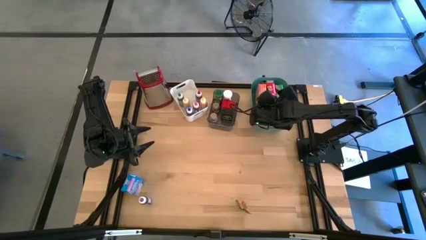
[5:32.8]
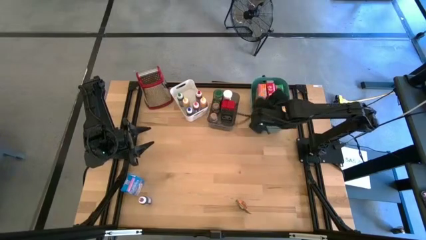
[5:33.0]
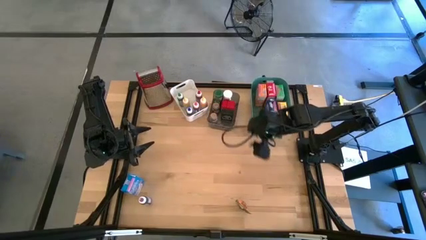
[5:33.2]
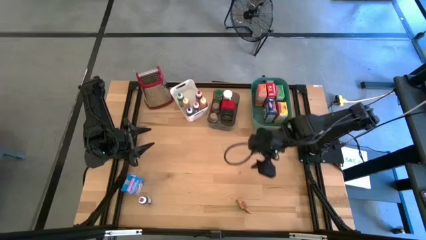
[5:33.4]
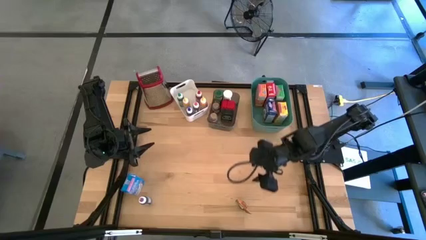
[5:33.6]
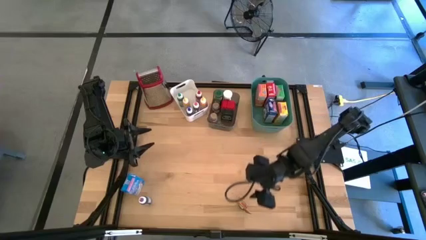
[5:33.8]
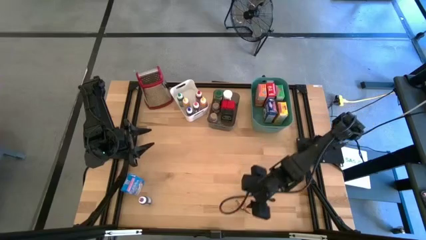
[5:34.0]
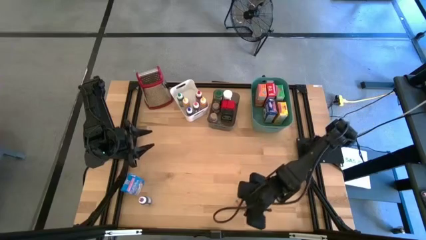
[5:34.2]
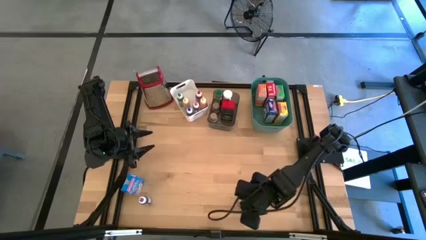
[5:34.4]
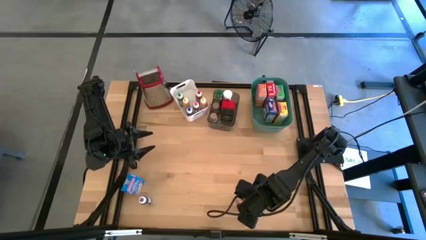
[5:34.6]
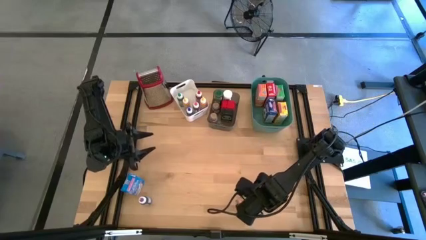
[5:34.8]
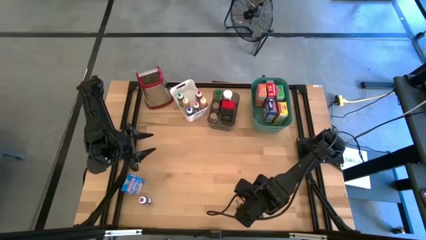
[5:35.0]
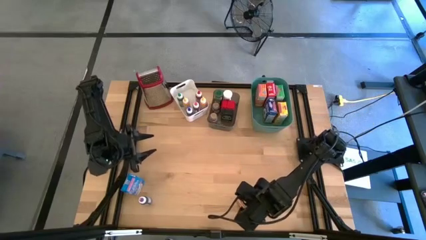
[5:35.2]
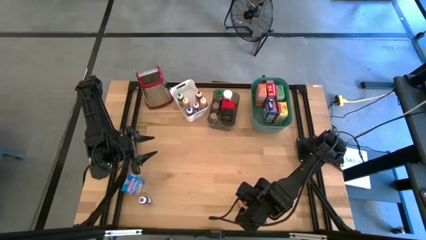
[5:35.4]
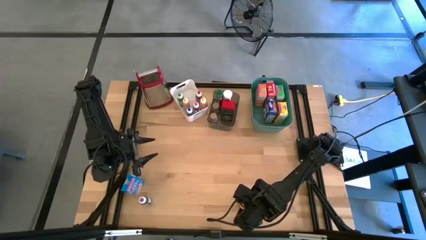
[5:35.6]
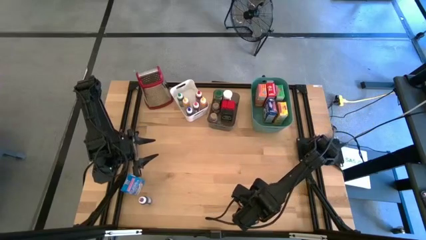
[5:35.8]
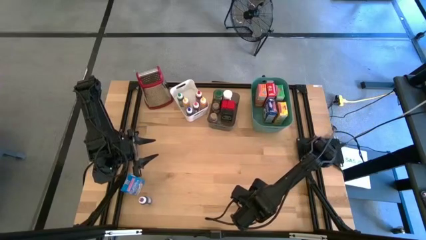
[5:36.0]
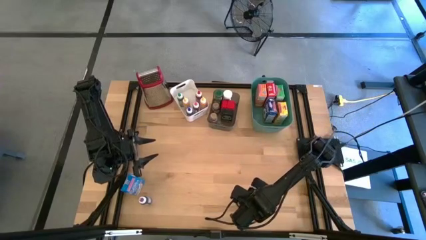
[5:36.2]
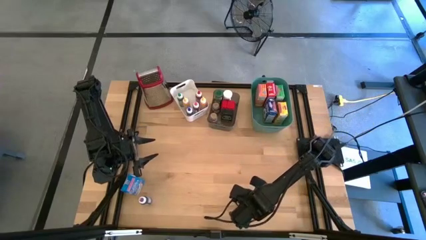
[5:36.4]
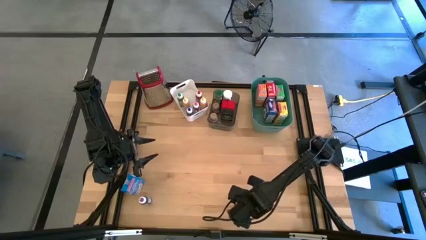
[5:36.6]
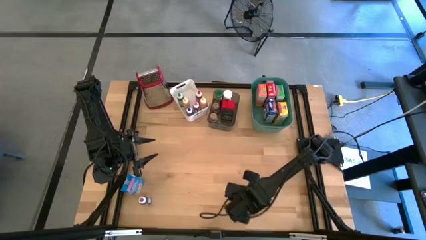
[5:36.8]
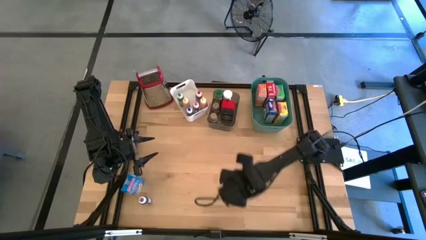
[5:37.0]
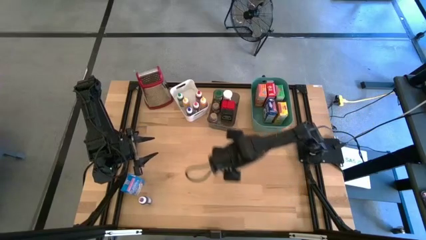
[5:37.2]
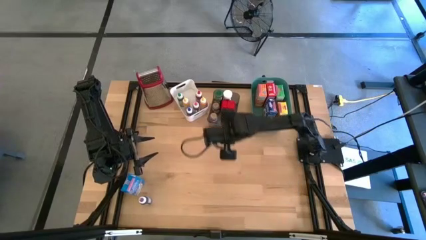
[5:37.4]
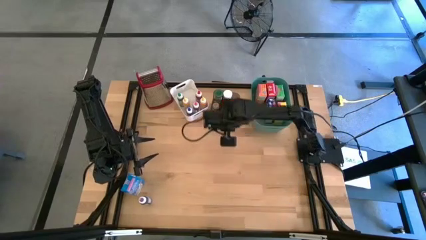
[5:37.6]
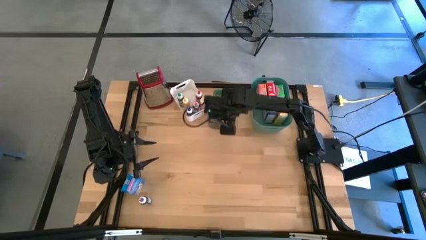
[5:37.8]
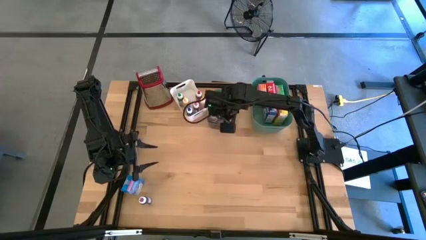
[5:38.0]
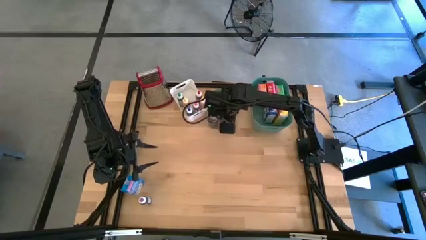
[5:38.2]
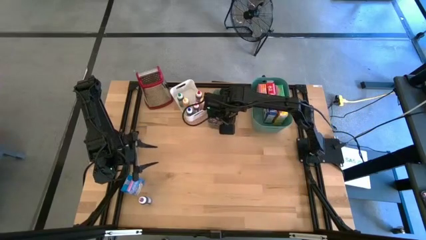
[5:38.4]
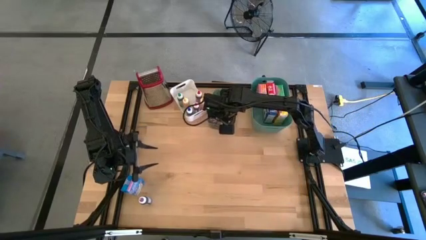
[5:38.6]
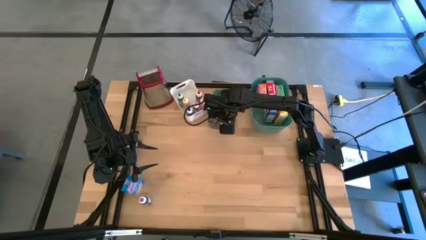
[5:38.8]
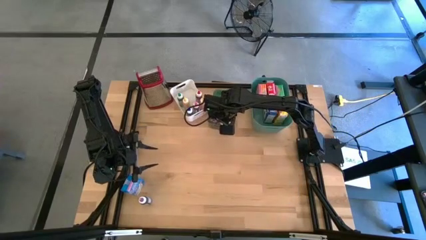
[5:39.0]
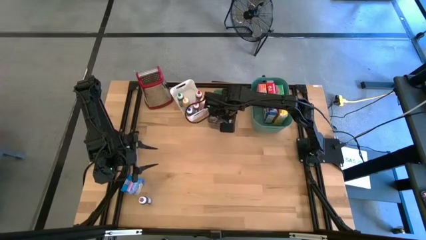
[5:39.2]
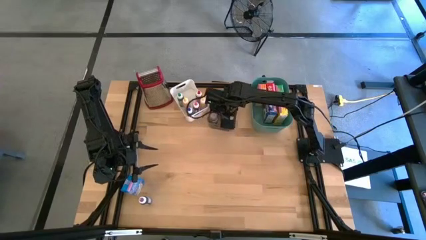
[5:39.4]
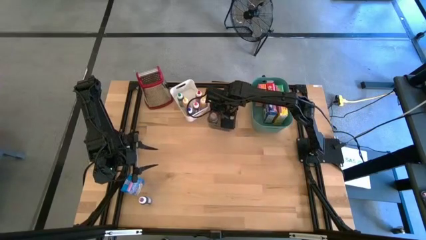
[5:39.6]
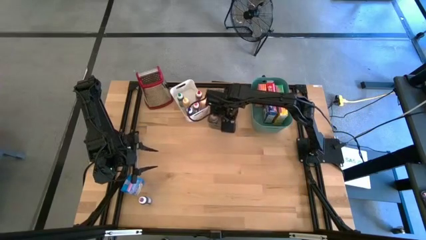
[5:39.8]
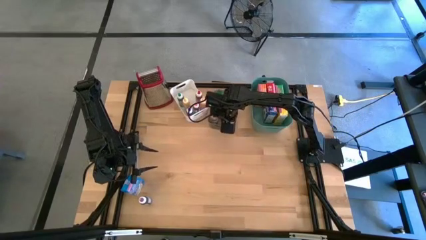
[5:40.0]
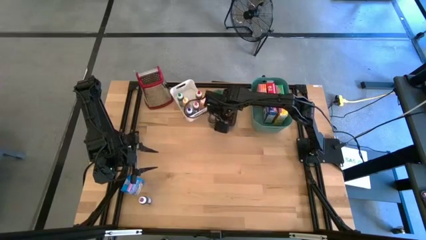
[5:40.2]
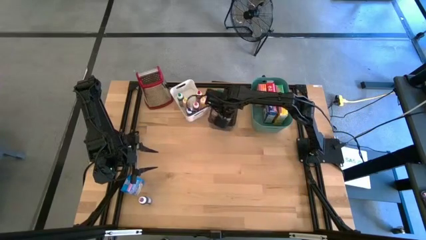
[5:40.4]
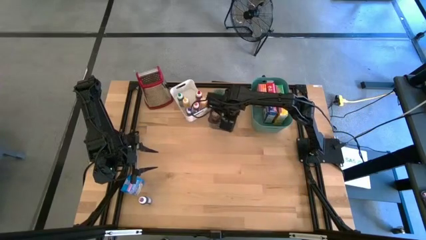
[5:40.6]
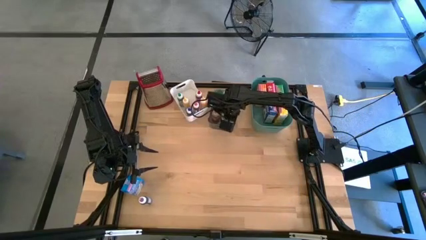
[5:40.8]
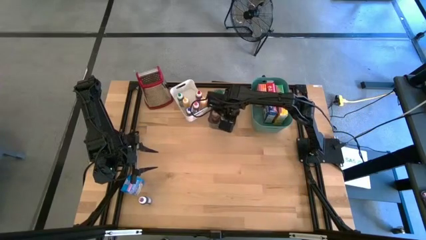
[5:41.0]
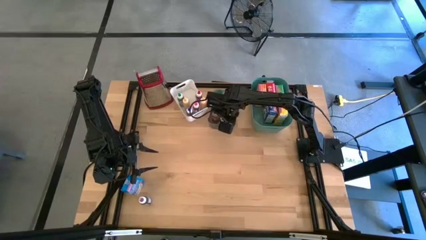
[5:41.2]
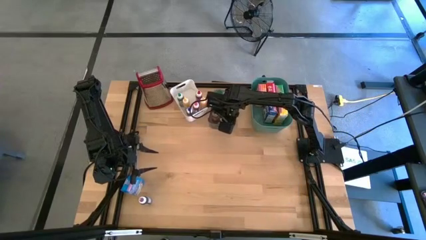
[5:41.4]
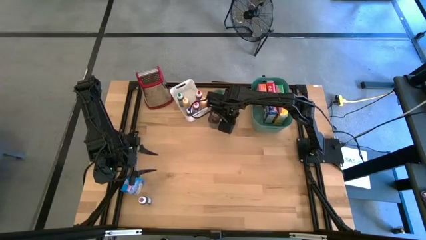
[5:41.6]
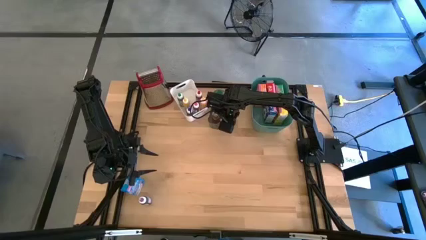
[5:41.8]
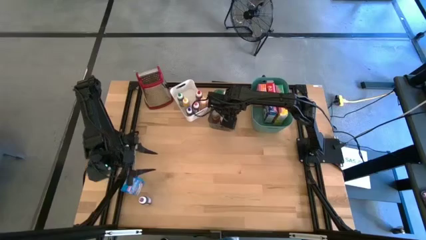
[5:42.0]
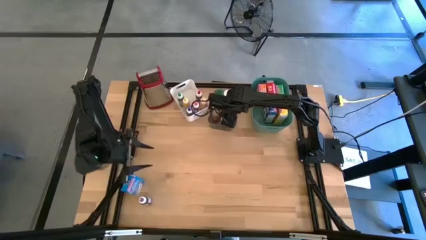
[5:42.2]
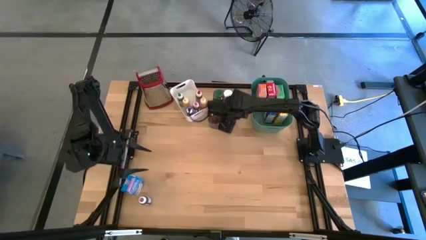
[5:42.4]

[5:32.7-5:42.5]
Task: Pick & Place Kitchen Items
Put the orange spice pack into the black bin

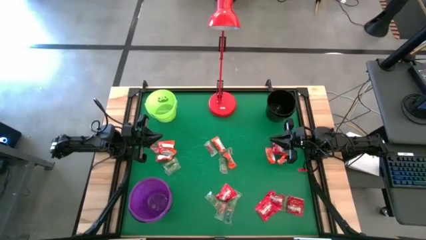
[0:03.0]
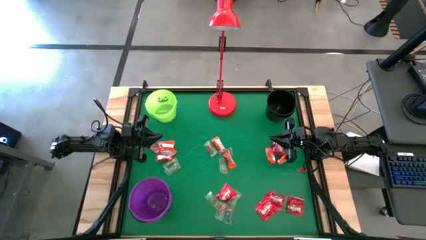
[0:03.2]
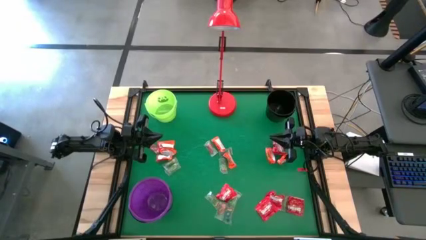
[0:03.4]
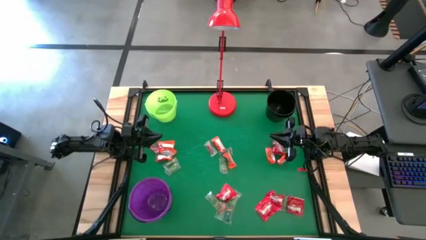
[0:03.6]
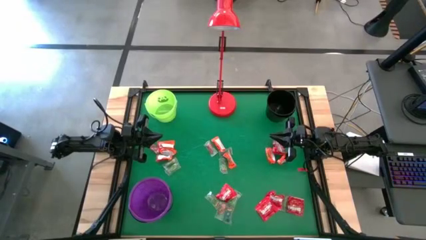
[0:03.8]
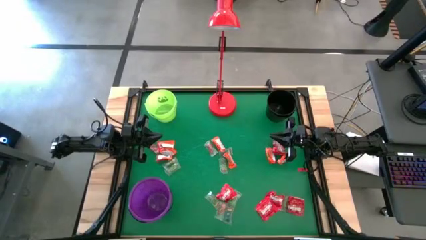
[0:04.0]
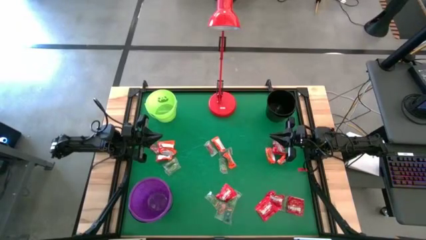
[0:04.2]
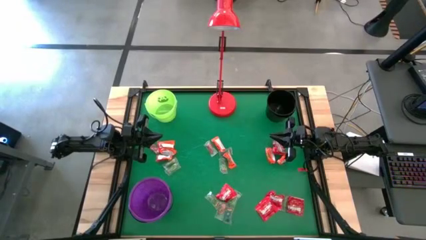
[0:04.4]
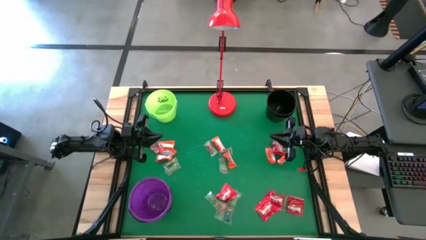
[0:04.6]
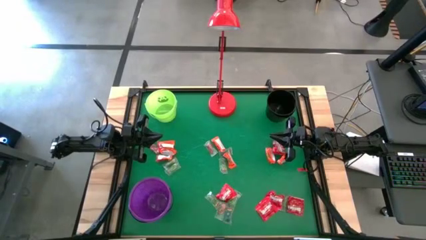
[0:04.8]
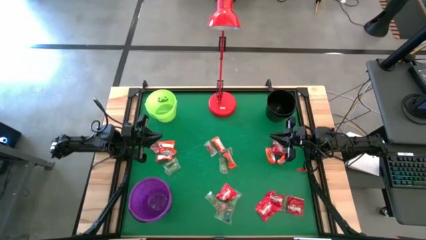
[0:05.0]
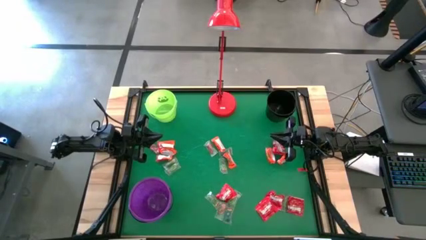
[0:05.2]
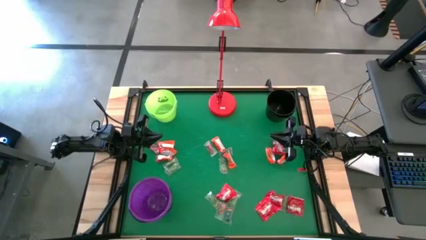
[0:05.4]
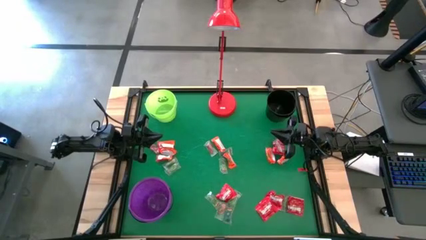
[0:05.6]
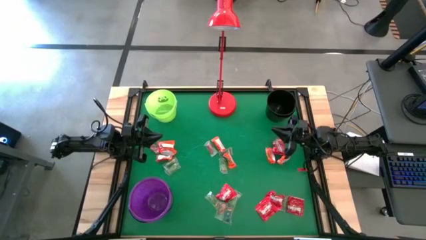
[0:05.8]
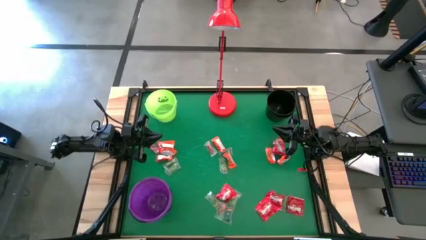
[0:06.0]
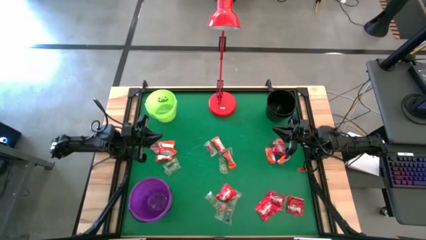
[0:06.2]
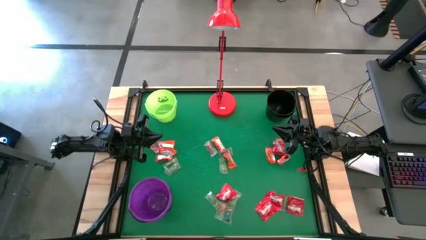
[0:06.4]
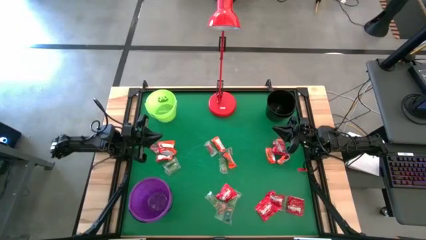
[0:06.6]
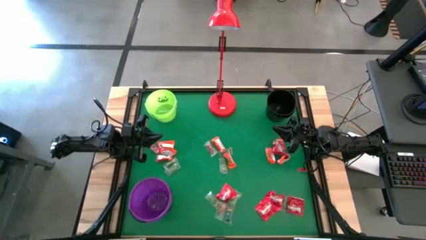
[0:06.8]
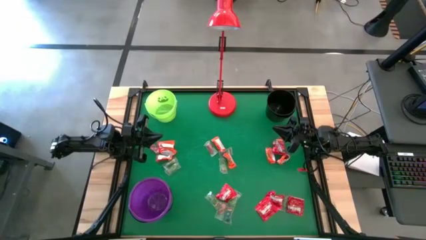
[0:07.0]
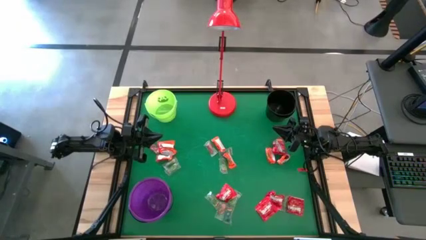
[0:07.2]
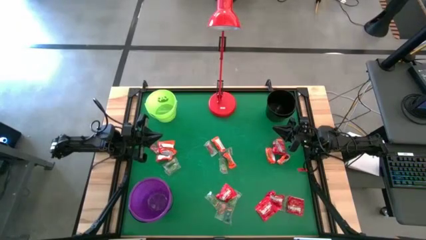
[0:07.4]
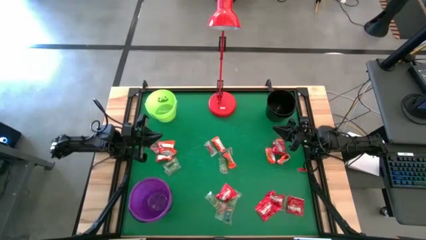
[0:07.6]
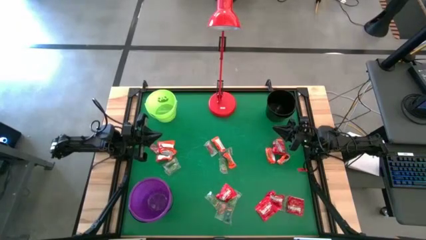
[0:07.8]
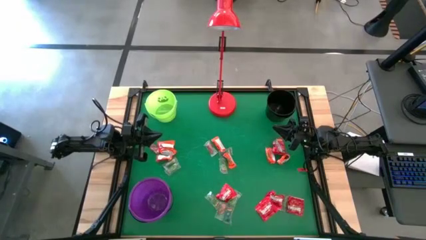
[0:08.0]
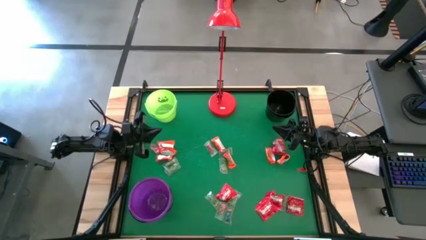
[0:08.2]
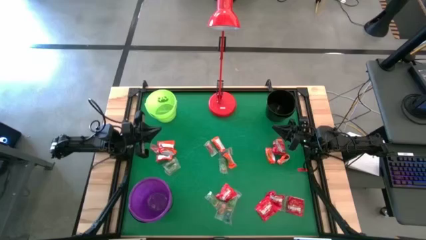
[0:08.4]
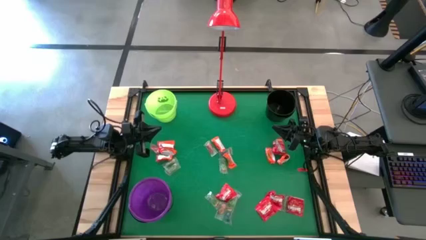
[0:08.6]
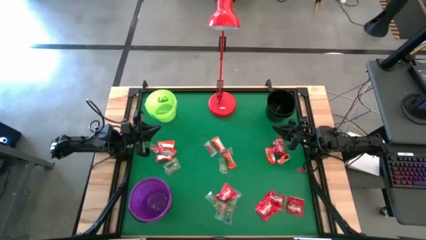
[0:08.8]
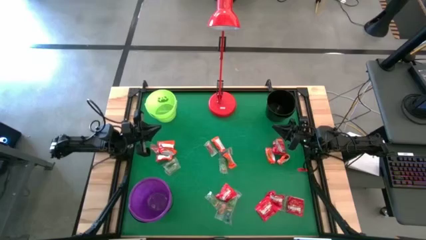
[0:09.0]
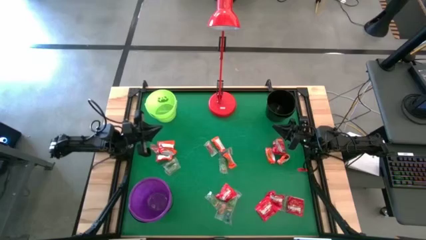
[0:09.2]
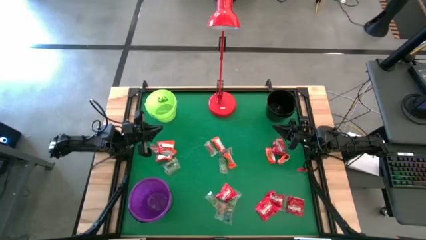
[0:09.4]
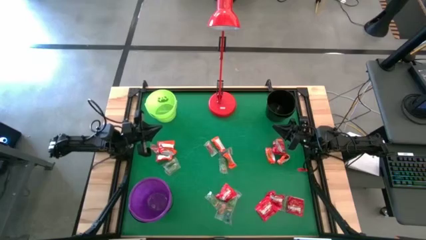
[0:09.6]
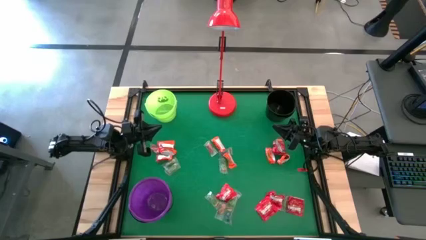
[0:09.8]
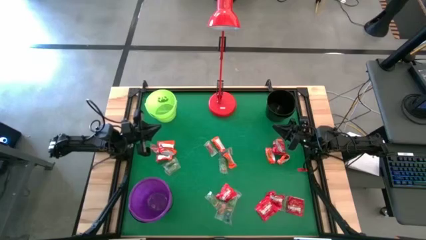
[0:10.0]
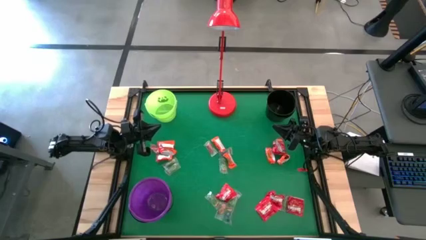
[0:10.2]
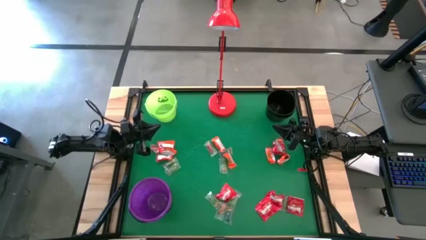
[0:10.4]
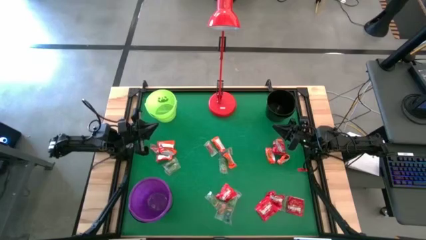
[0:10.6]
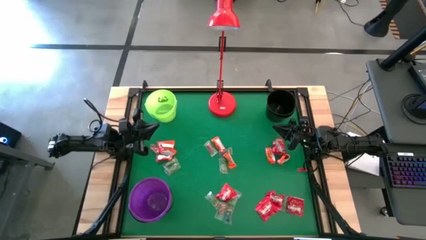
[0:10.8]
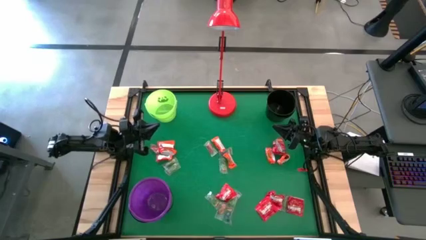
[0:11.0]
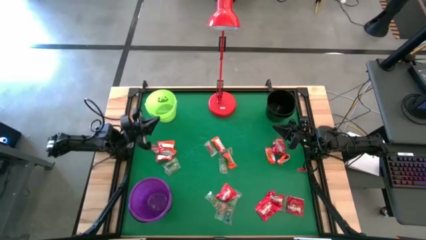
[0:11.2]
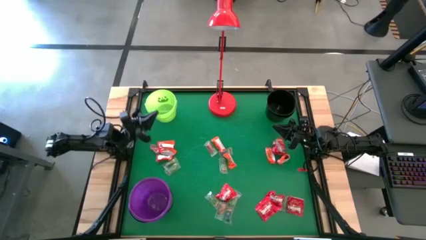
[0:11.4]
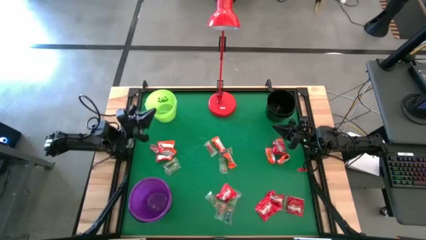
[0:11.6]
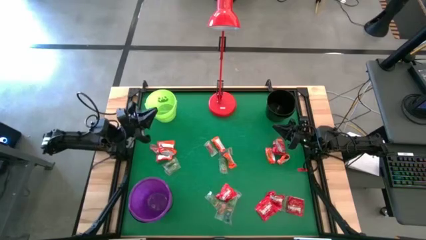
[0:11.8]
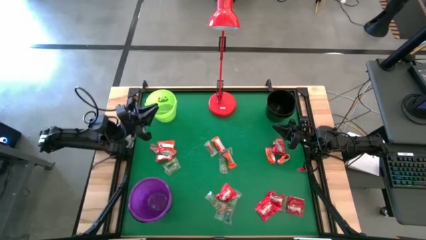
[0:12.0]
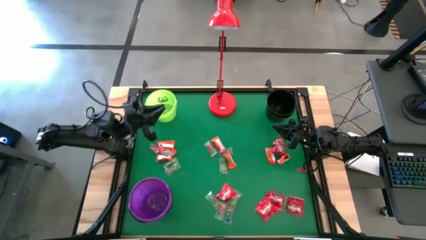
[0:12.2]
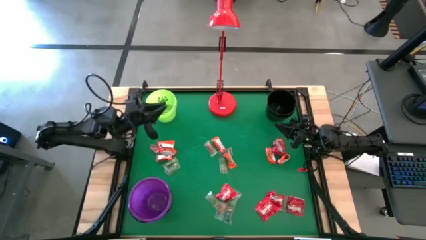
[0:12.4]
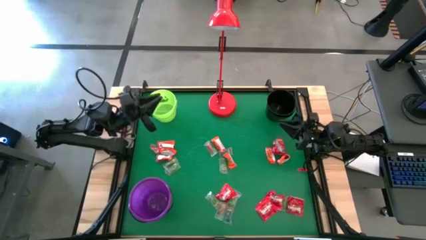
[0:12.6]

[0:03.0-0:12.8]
Task: Sort candy
Put the transparent candy into the green bucket
